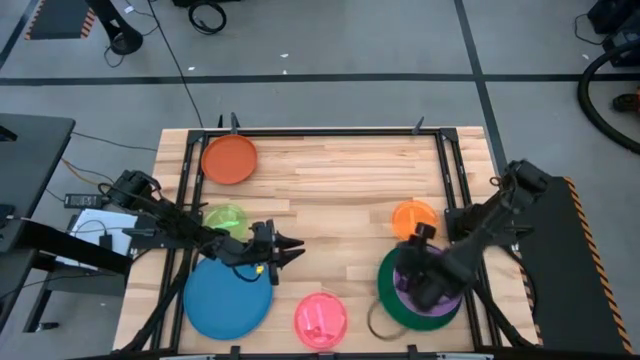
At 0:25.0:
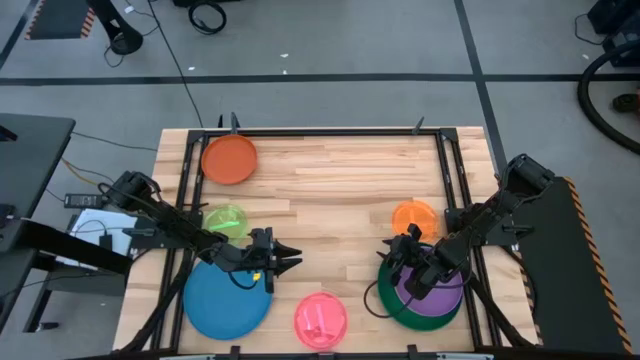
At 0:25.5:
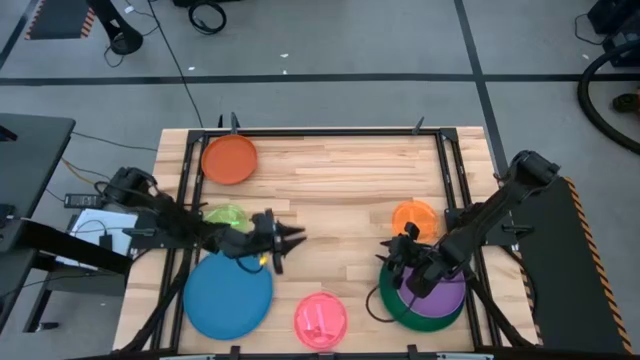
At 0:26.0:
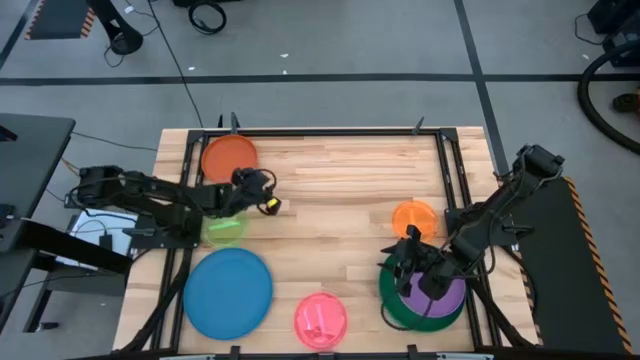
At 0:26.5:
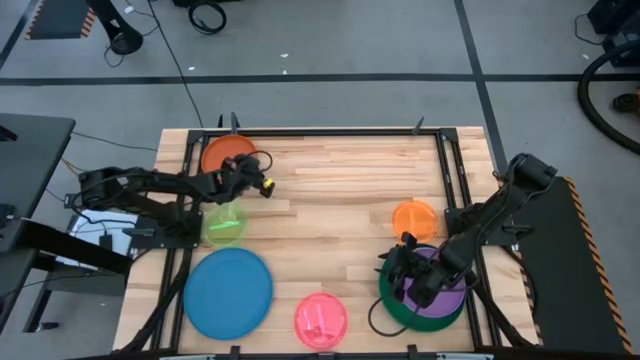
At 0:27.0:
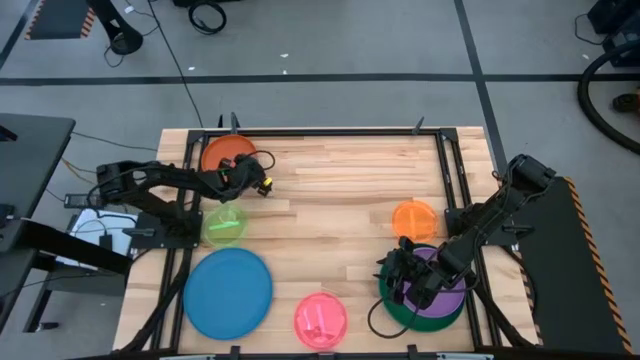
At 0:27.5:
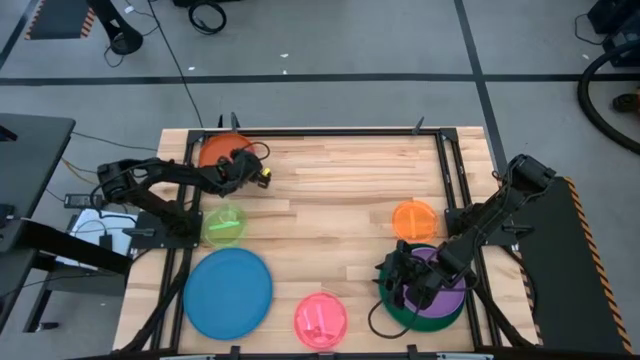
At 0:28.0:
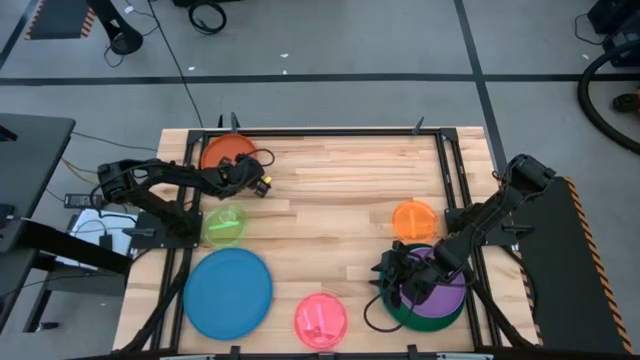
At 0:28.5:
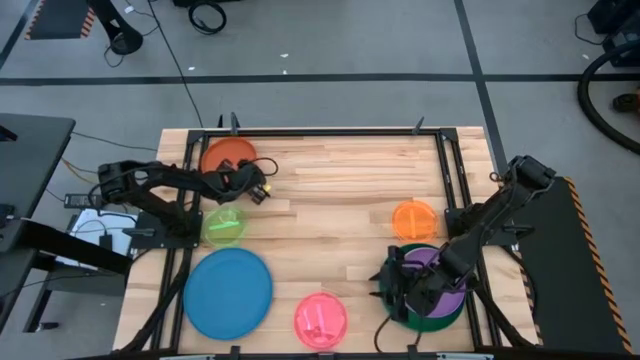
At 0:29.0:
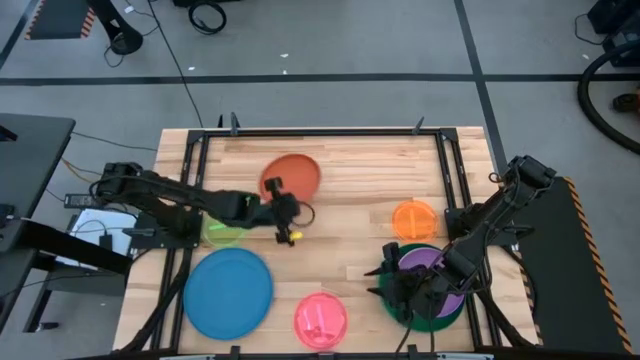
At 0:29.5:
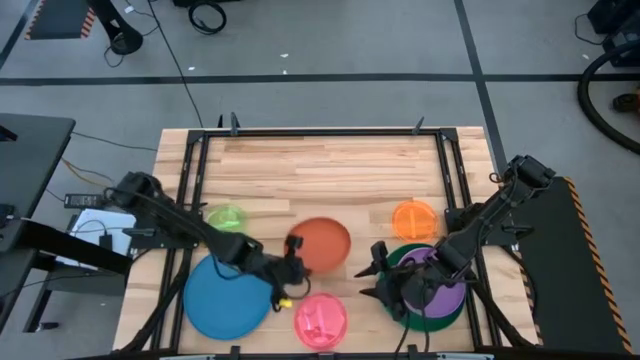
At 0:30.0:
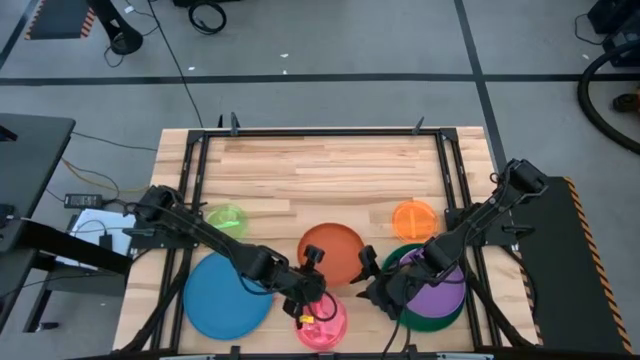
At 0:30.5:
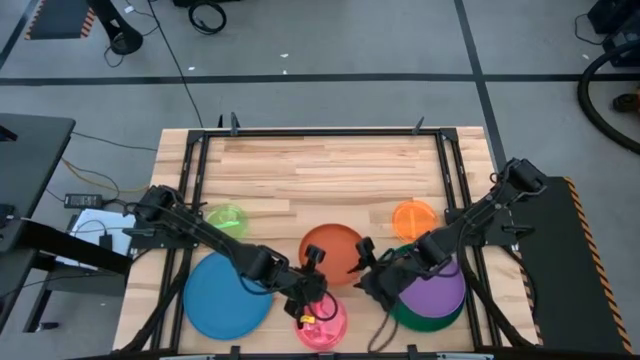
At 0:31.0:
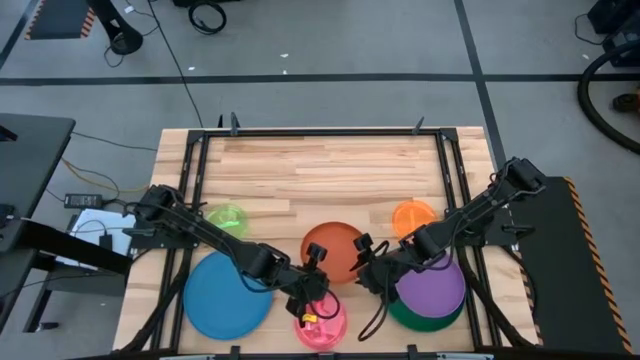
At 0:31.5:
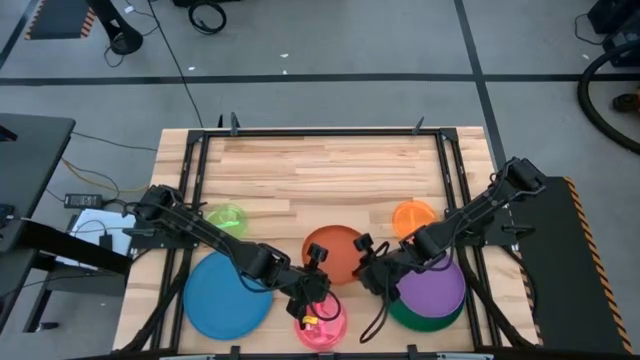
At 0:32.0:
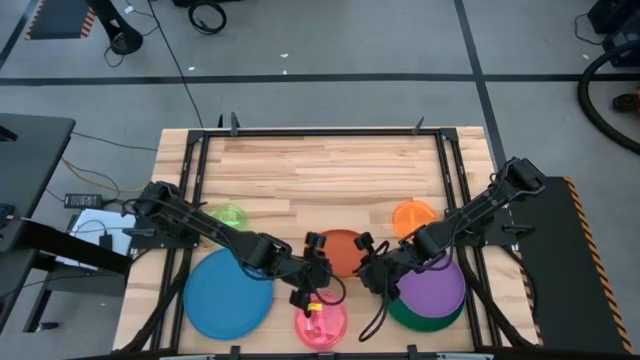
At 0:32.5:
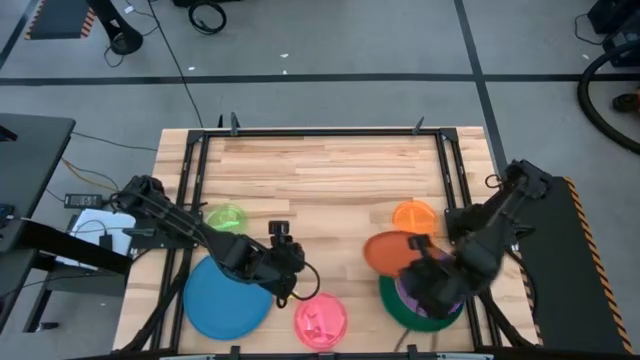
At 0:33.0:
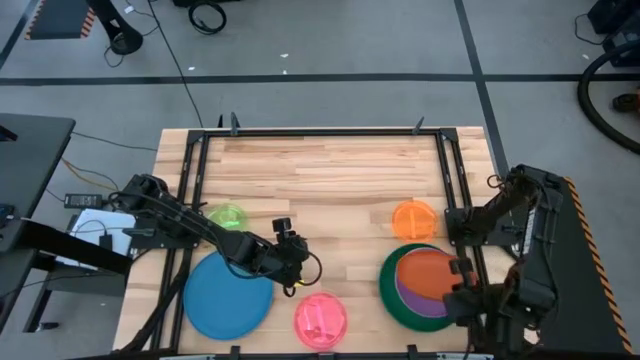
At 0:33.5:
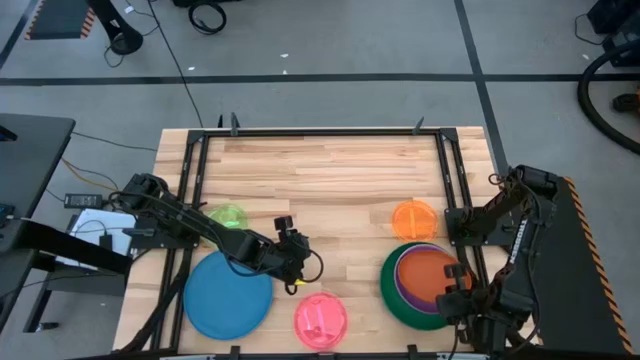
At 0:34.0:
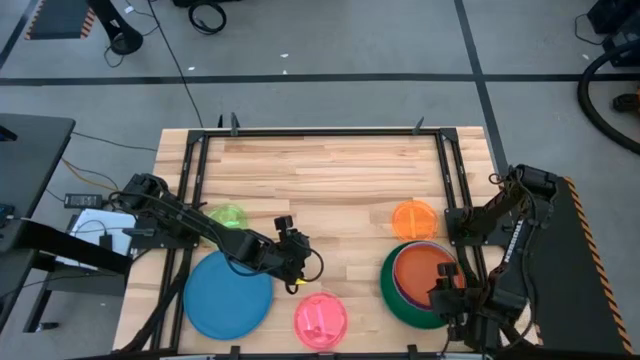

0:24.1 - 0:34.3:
Task: Stack plastic plates
Stack the orange plate on top of the purple plate

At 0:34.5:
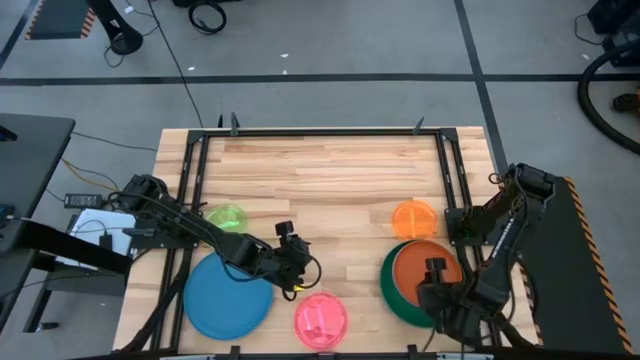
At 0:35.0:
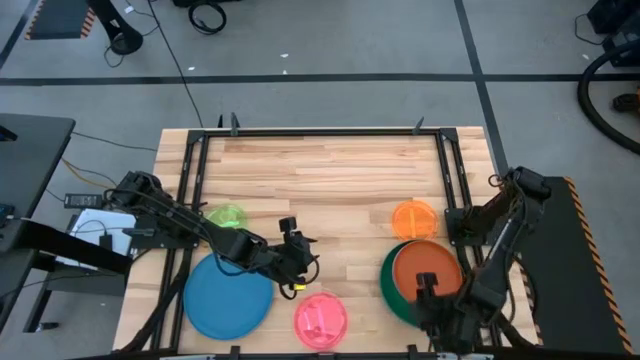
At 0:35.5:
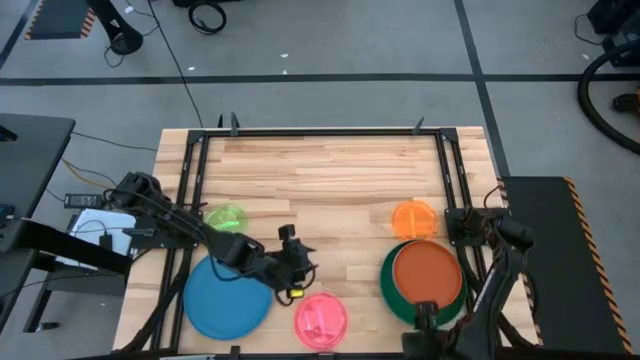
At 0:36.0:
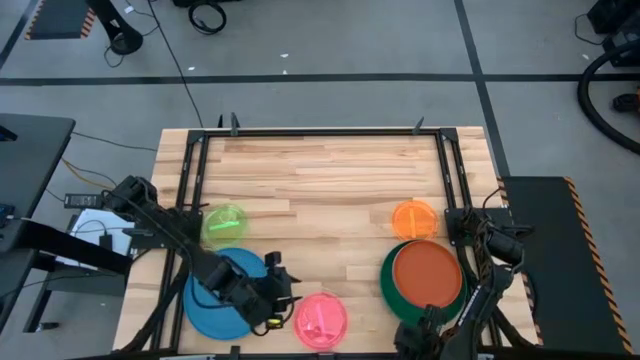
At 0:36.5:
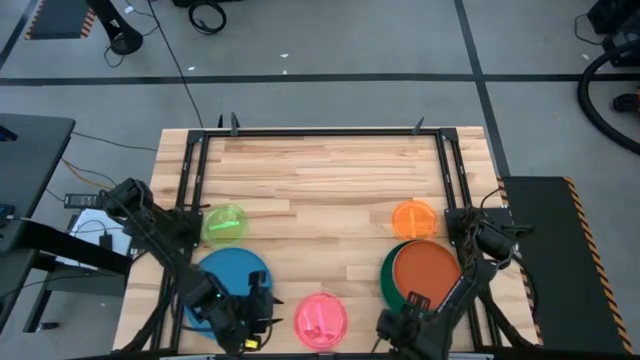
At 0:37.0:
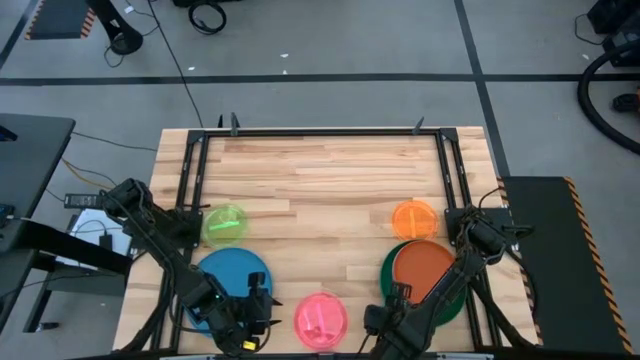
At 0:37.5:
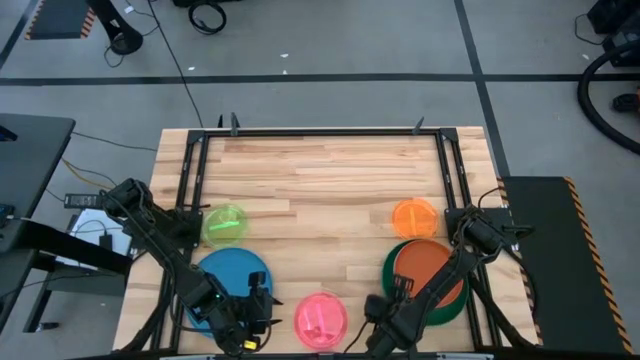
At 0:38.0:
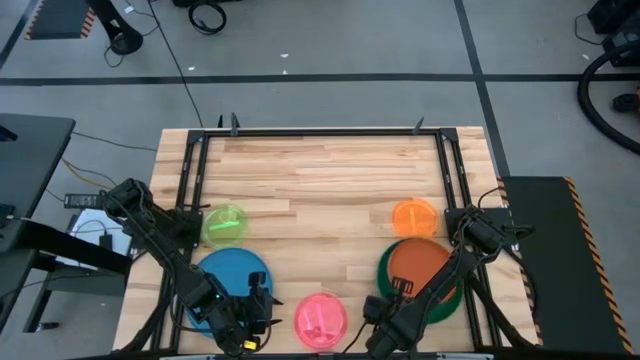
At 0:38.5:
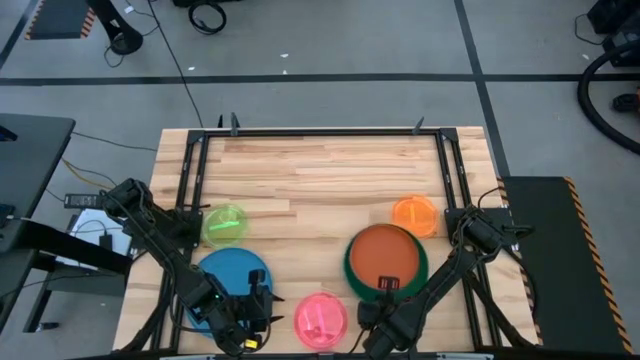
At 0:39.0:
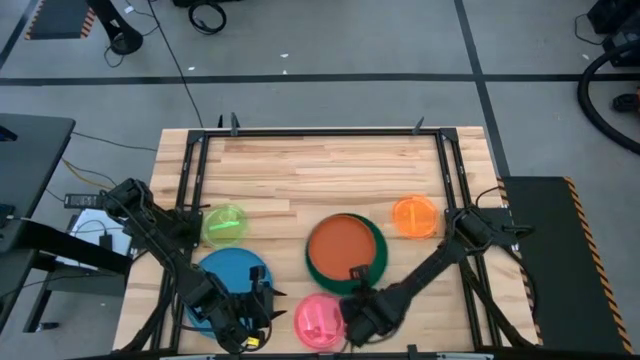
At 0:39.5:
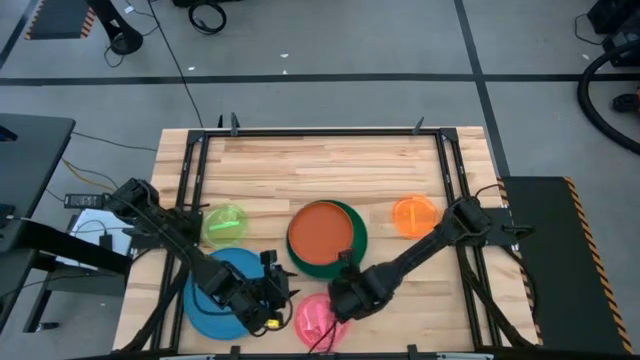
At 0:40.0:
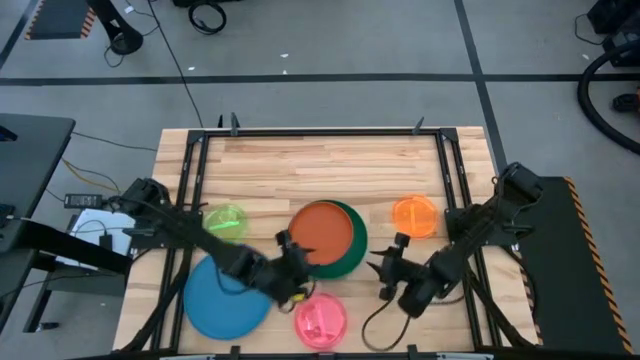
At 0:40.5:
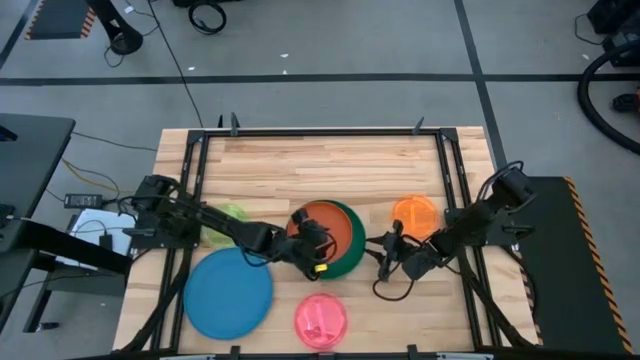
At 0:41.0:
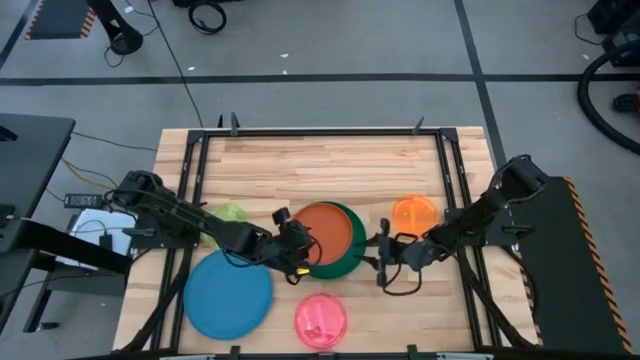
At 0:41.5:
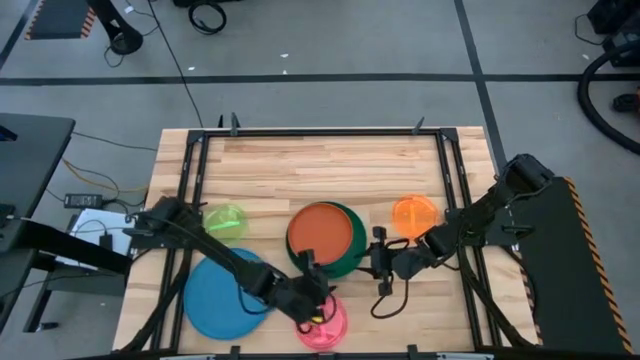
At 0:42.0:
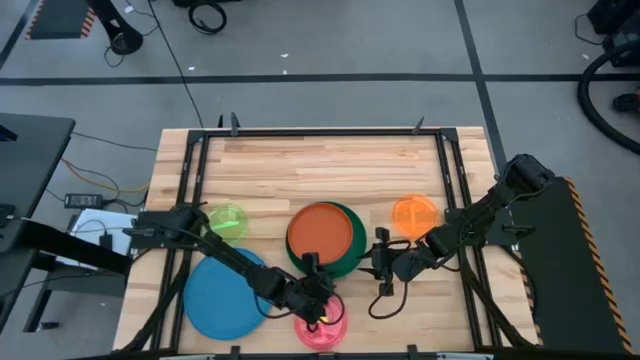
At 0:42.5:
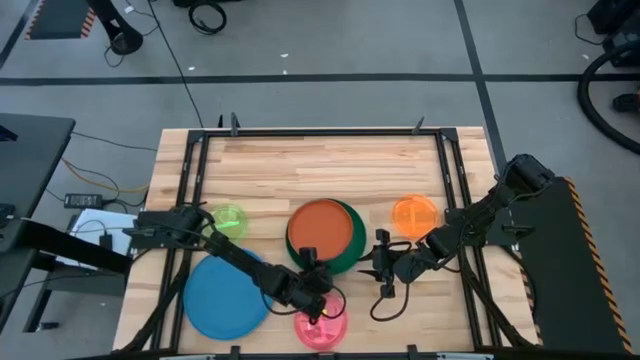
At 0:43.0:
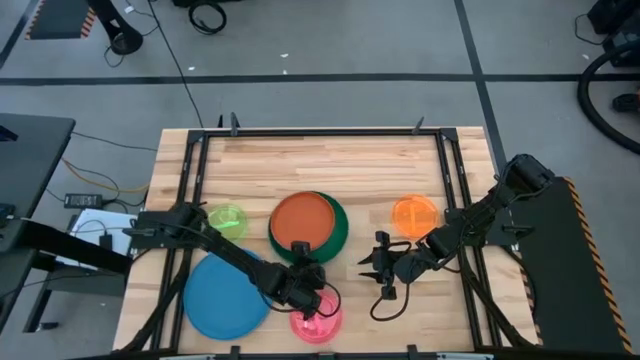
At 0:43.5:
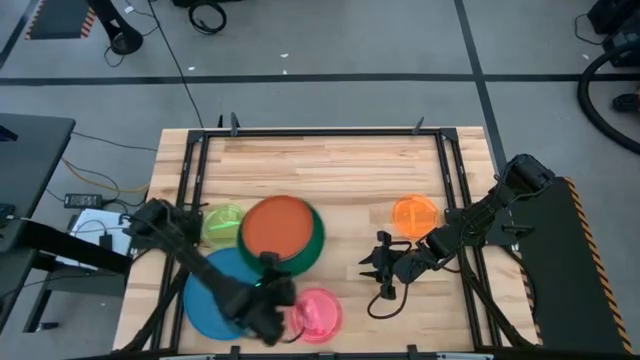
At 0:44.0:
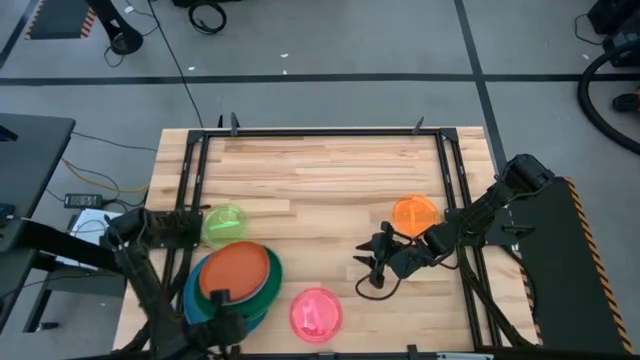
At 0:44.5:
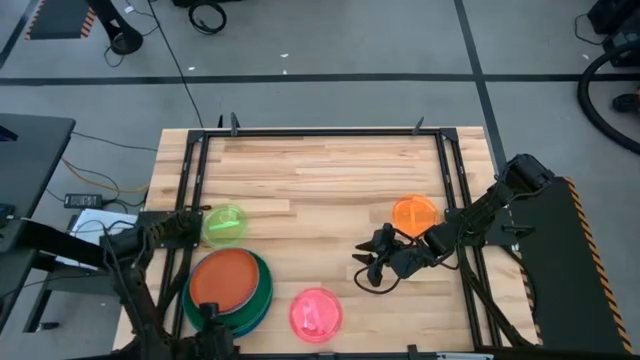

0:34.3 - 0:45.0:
Put the stack of plates on top of the blue plate

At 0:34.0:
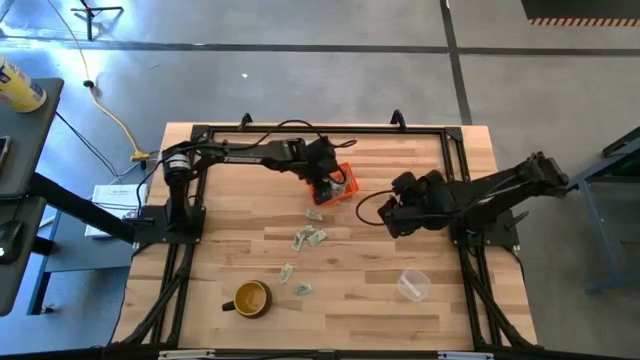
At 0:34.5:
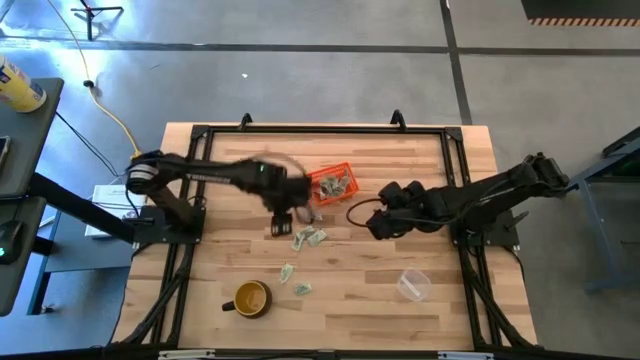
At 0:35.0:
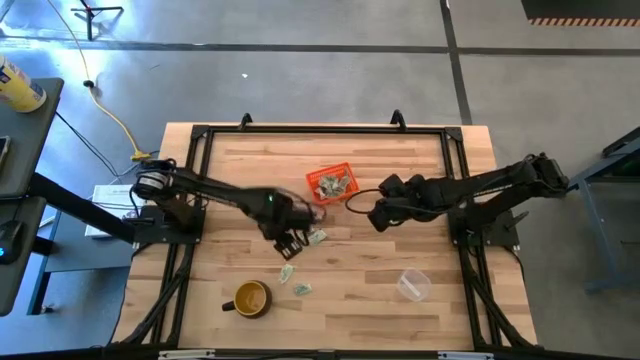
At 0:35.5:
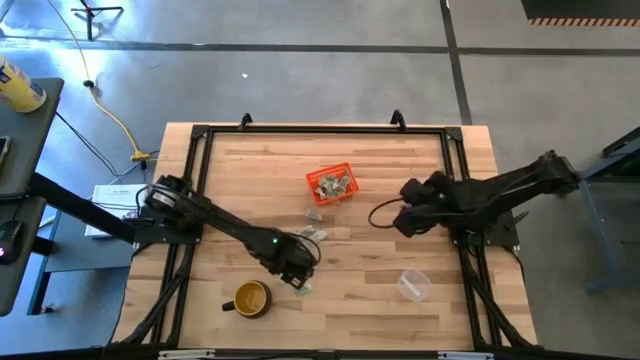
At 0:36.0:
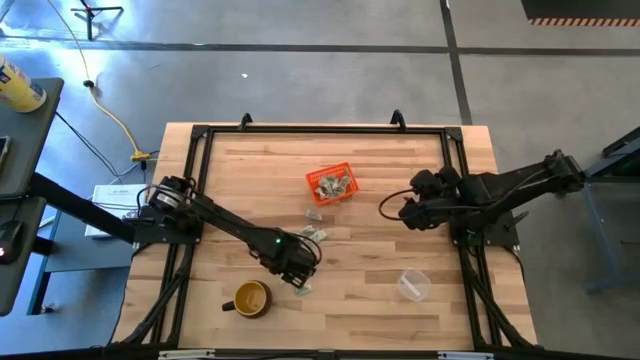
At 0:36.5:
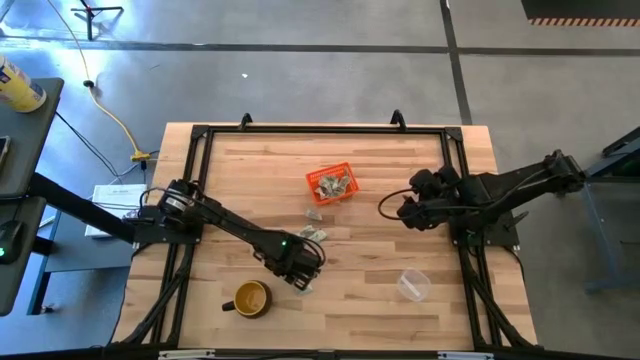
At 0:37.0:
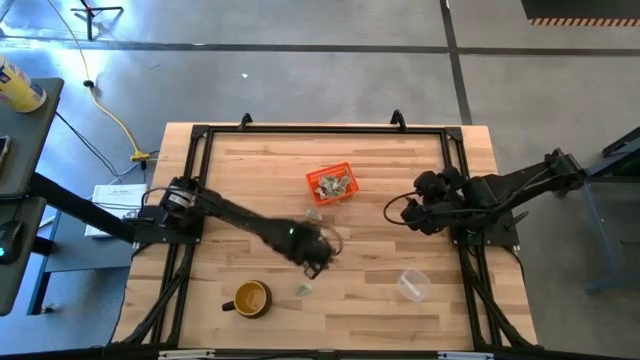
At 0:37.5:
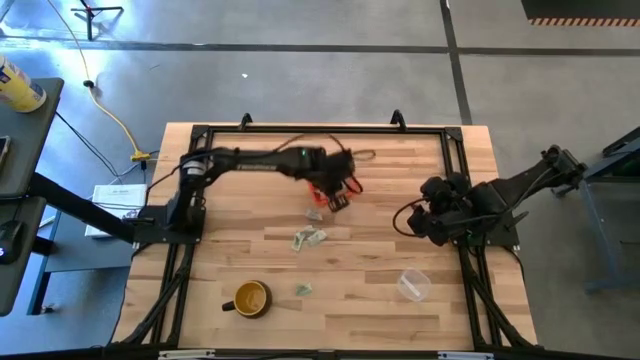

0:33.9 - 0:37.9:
Task: Pick and place items into bin
Put the white stevia packet into the orange bin
